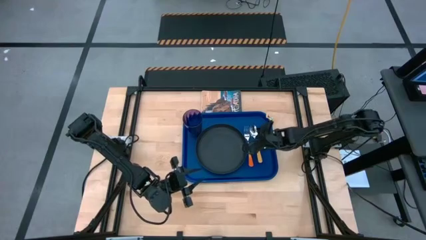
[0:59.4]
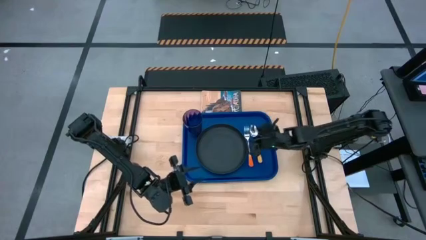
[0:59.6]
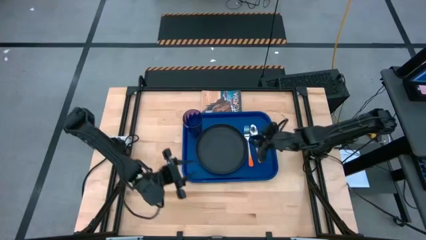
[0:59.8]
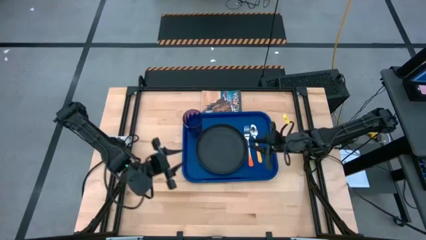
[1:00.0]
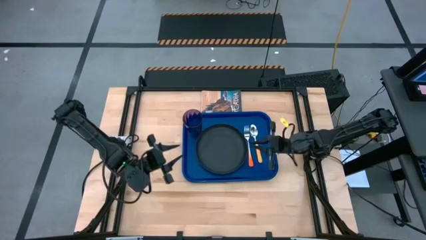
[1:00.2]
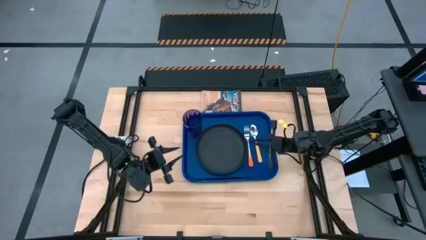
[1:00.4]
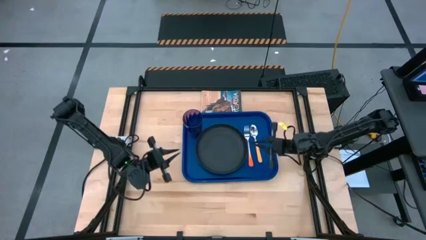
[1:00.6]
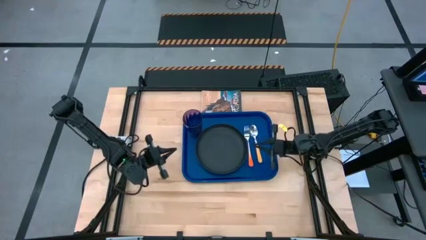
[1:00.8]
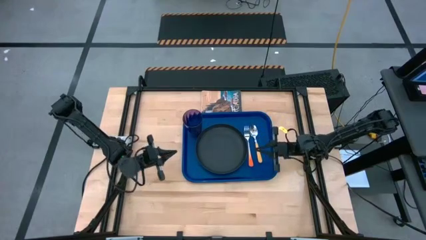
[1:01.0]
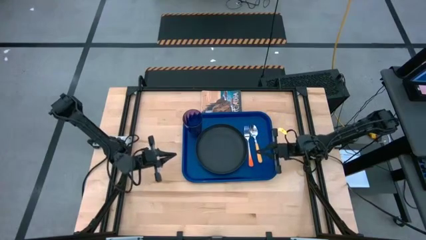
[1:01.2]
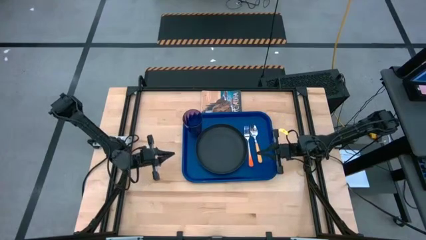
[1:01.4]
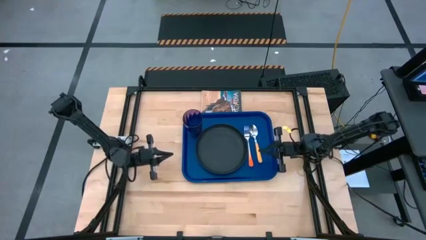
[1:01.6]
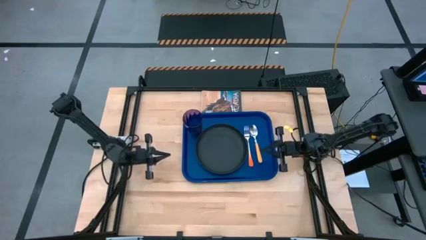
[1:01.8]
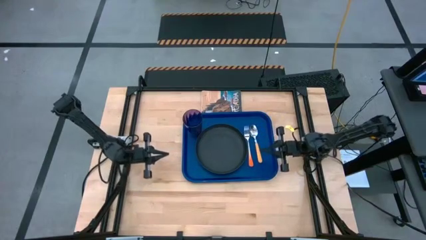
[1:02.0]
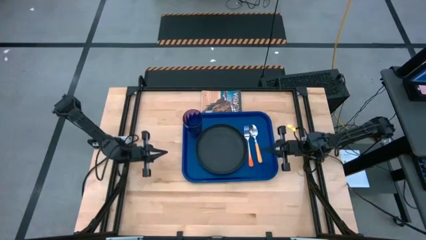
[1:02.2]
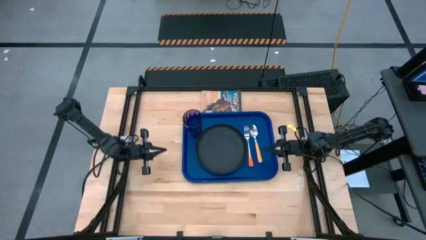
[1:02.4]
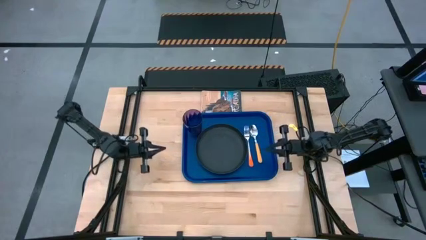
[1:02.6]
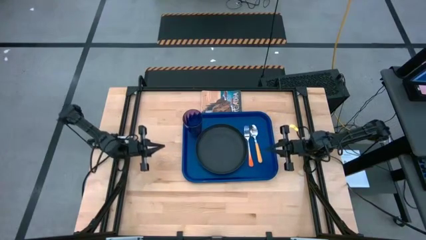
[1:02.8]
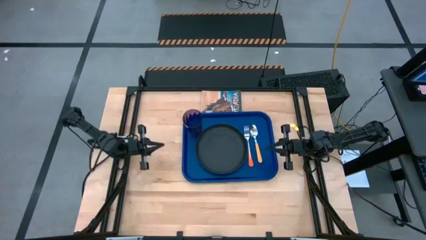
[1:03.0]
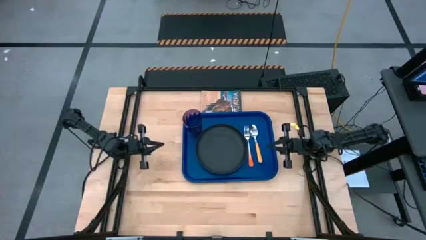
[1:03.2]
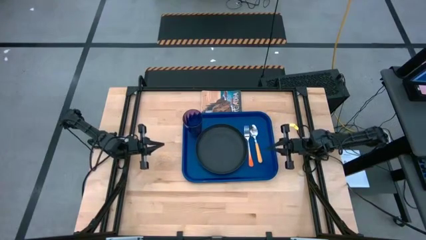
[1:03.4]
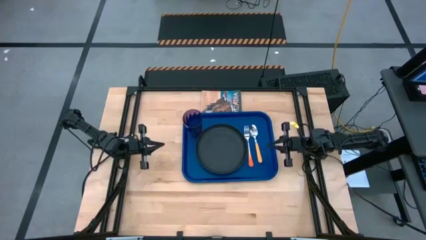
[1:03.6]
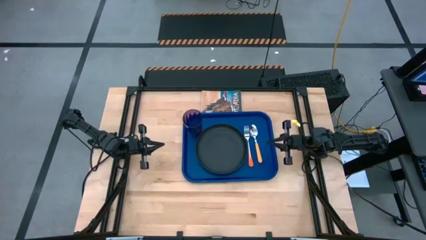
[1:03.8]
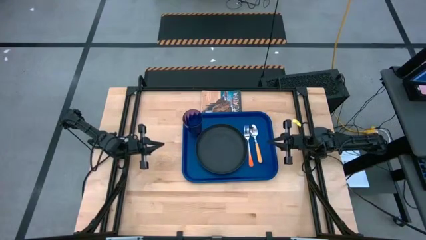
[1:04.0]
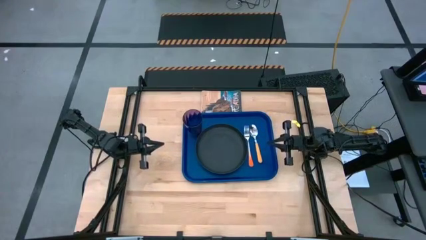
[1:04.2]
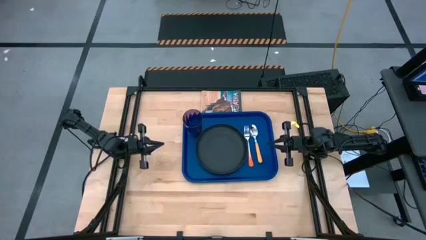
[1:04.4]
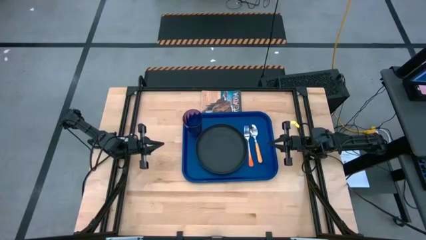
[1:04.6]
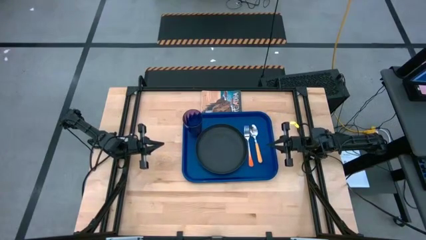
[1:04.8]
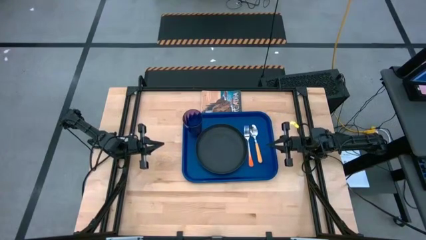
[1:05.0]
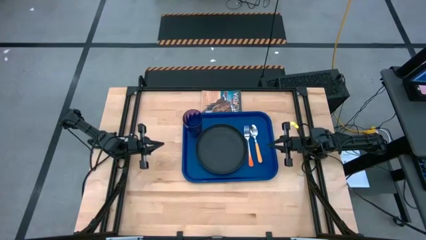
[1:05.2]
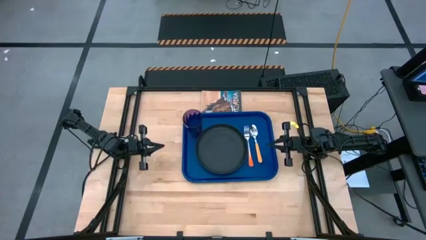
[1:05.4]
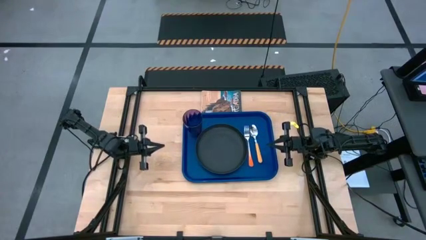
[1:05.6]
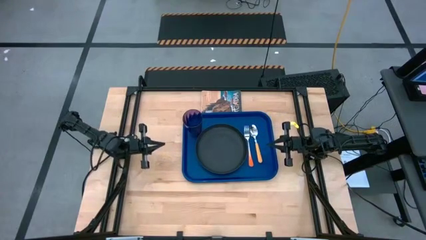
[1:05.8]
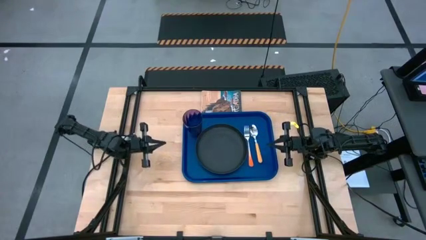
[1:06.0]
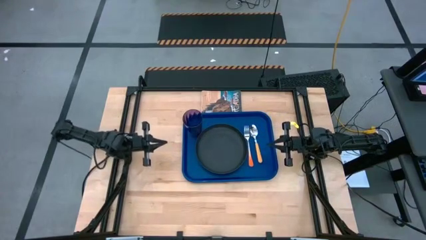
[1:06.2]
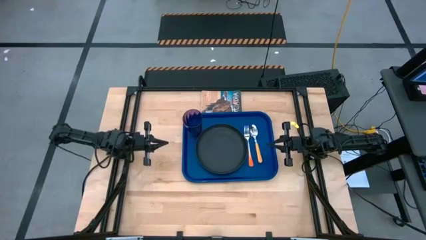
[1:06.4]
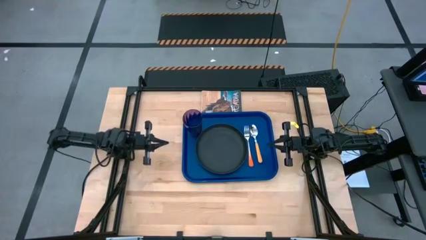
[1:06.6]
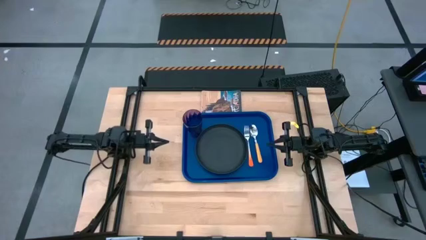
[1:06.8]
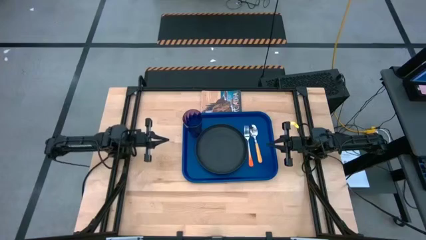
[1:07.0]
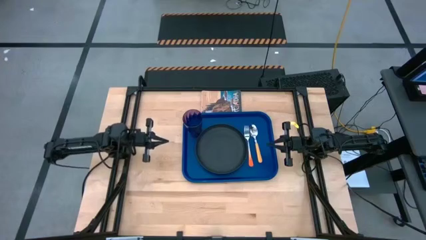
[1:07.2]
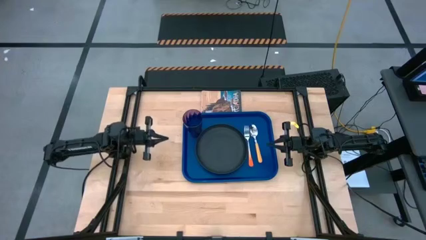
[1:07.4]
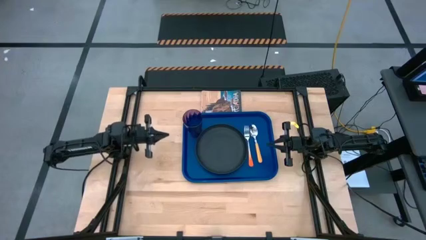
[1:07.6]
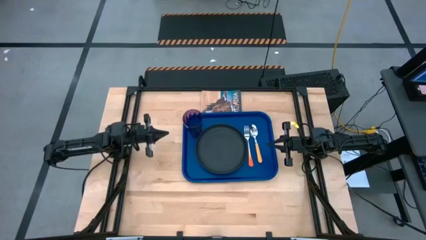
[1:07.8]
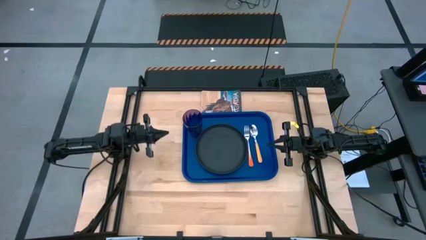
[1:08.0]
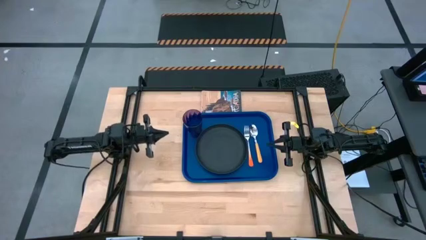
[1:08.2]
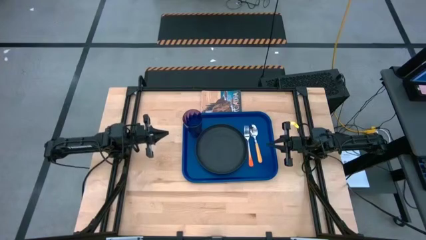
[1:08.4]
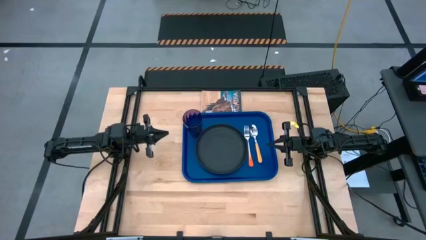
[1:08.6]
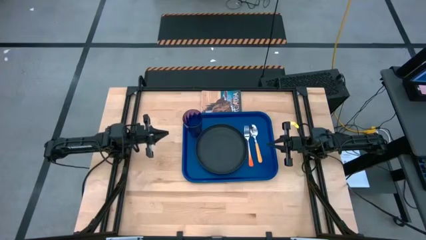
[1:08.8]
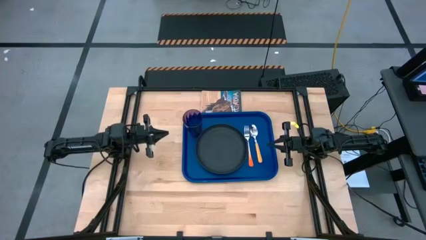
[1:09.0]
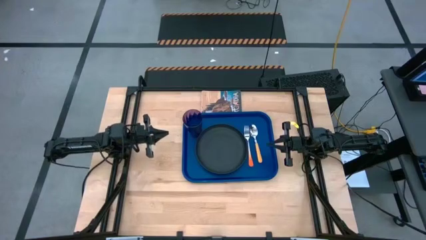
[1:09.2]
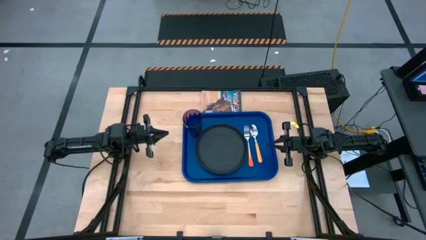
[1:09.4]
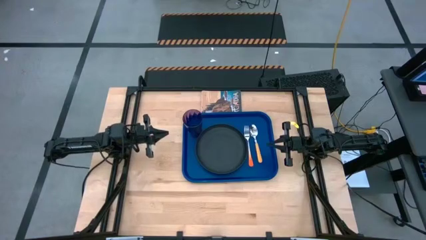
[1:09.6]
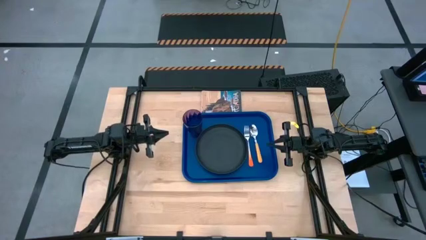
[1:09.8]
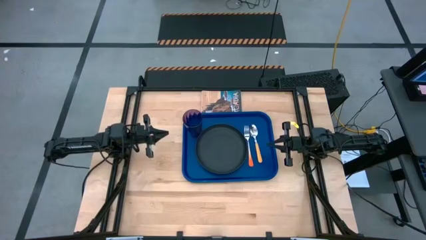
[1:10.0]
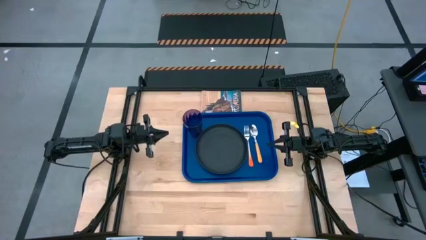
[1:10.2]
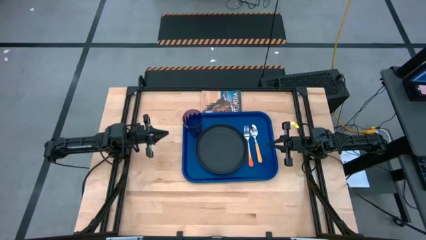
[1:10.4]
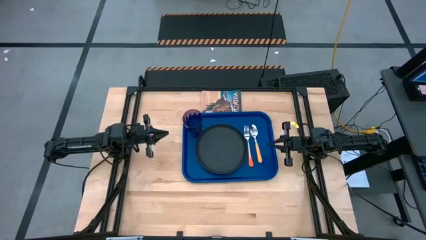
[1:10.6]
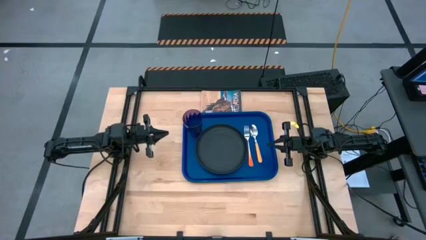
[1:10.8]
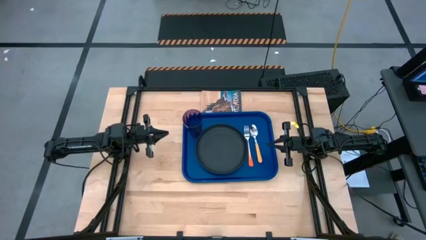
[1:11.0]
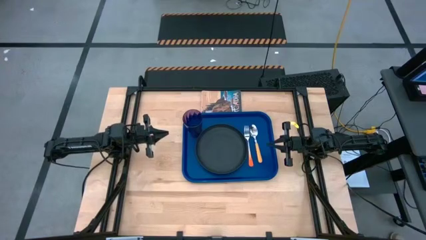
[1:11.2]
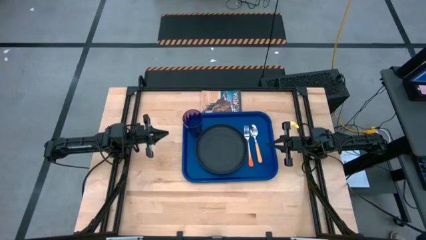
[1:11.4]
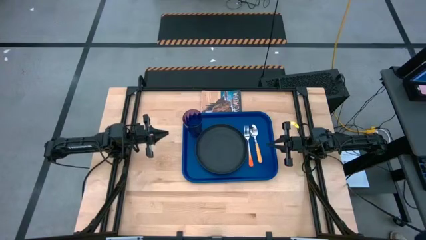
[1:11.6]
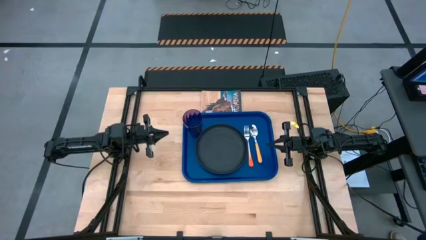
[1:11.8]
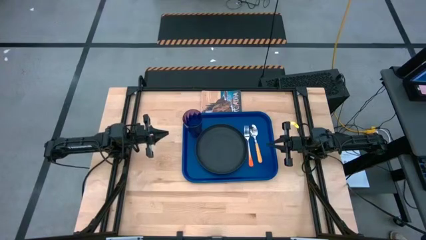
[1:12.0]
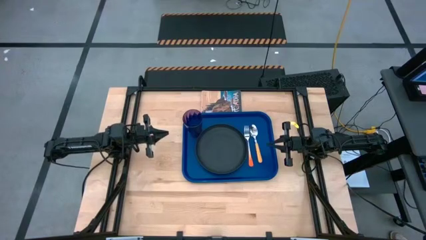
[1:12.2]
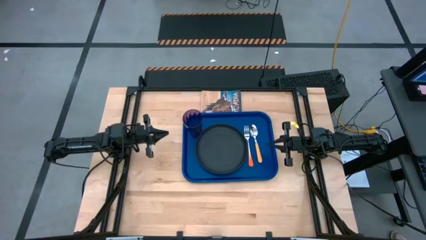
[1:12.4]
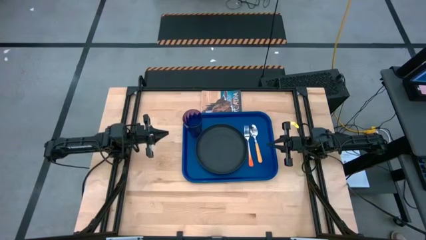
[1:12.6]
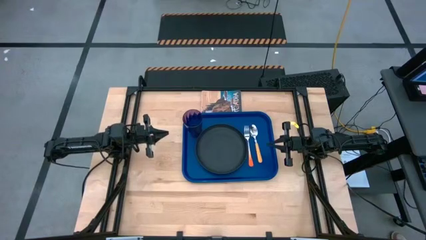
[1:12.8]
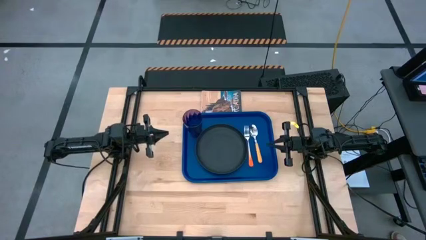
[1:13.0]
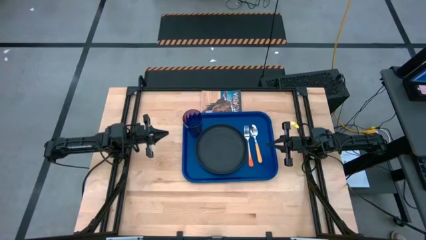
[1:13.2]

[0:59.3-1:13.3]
Task: Pick and place plate/cup/fork/spoon on tray
Return to Home Position
